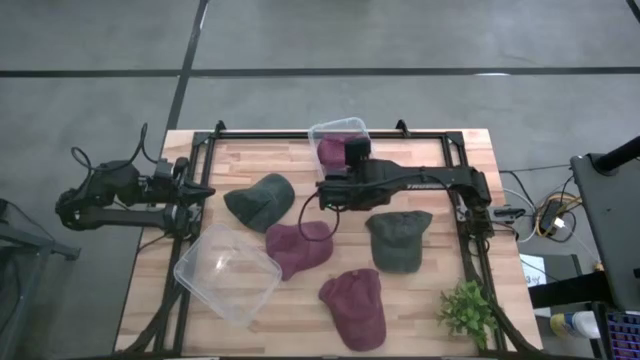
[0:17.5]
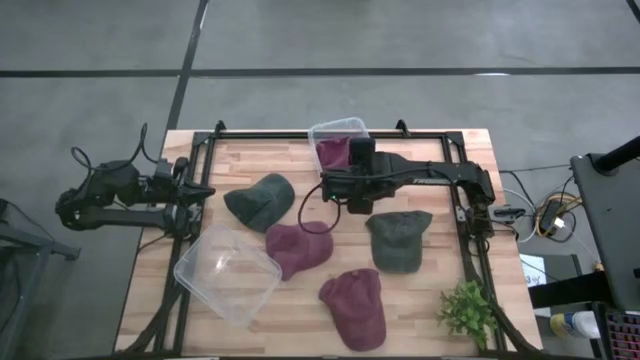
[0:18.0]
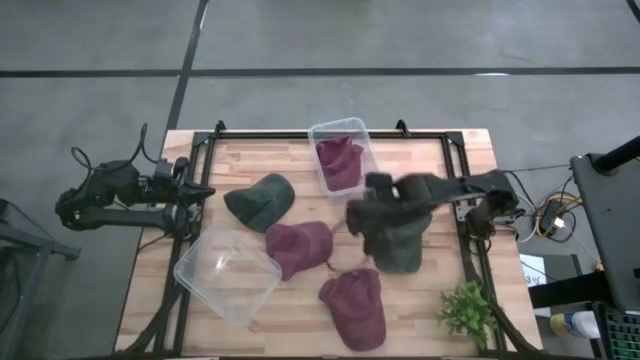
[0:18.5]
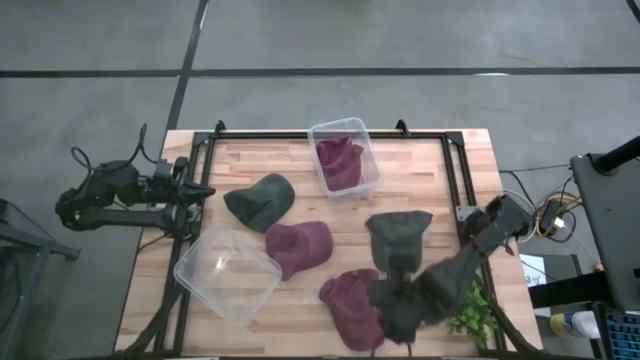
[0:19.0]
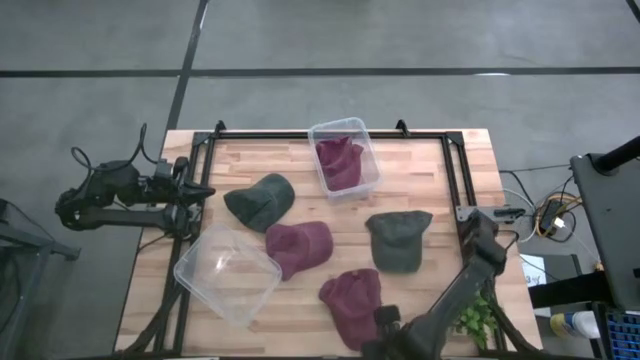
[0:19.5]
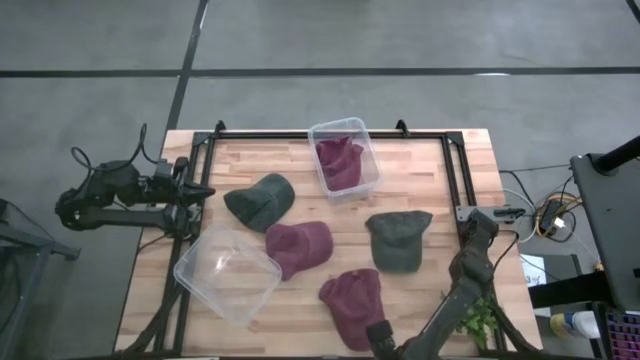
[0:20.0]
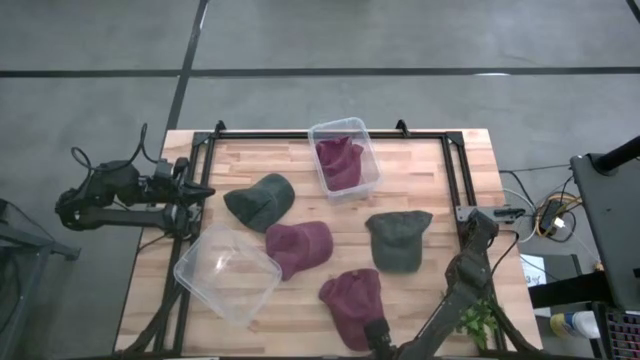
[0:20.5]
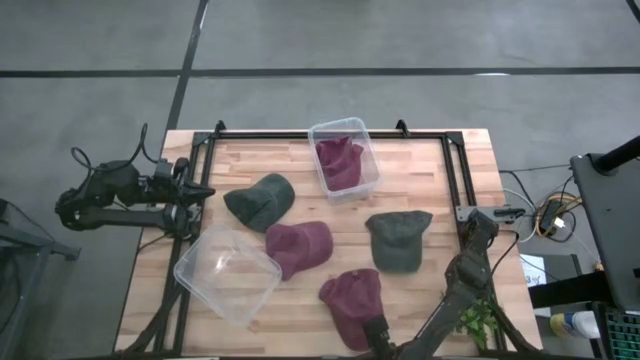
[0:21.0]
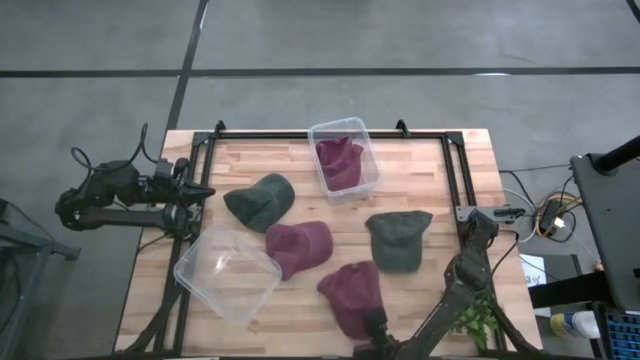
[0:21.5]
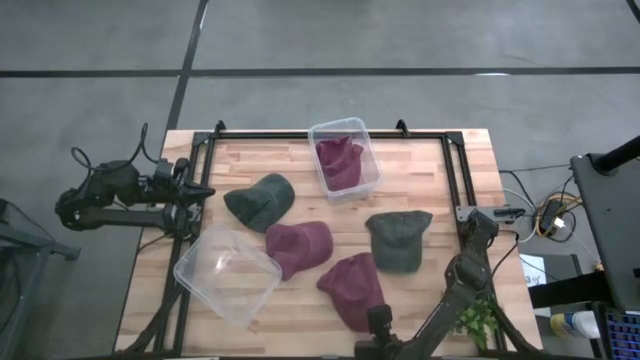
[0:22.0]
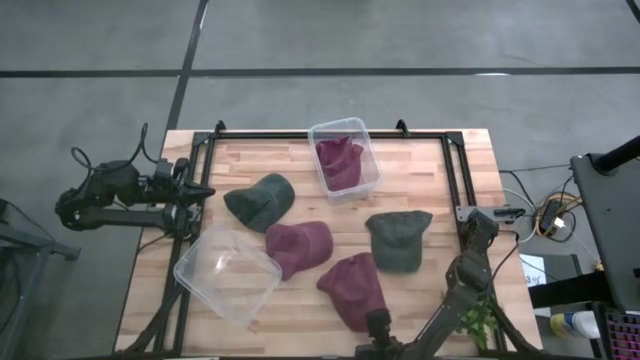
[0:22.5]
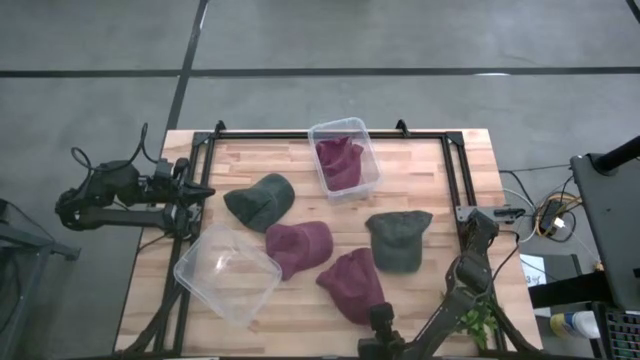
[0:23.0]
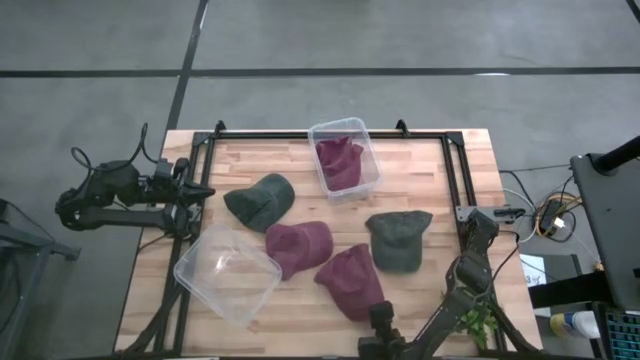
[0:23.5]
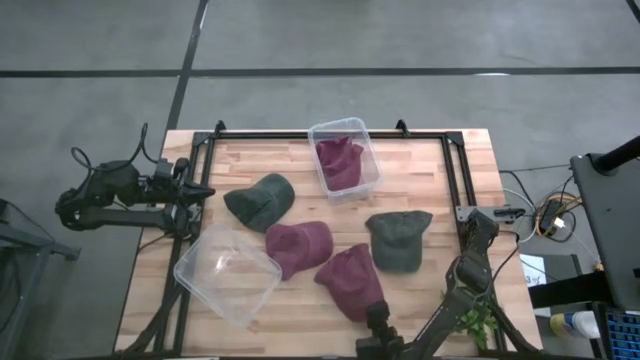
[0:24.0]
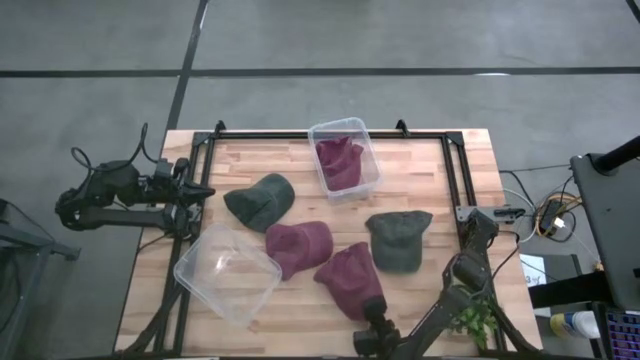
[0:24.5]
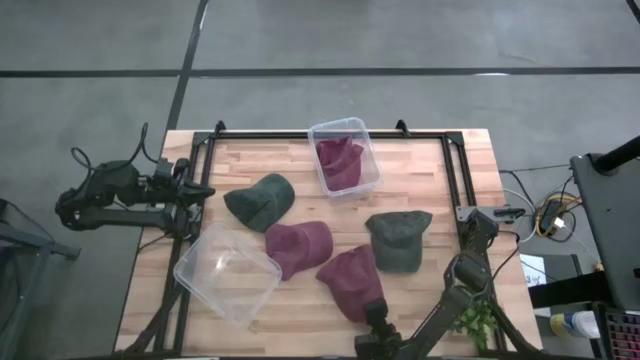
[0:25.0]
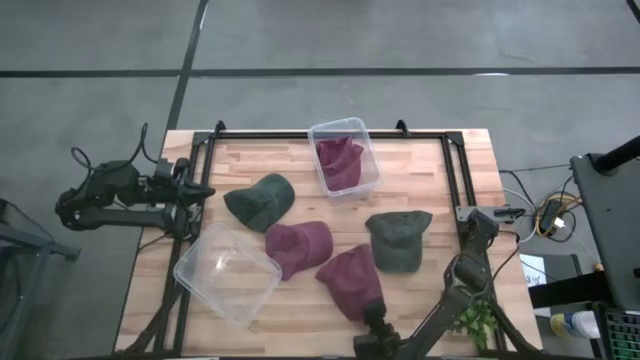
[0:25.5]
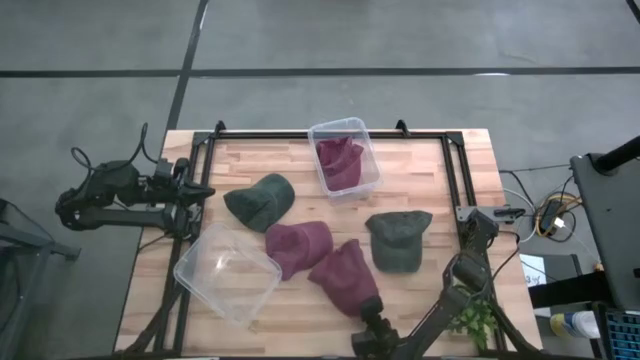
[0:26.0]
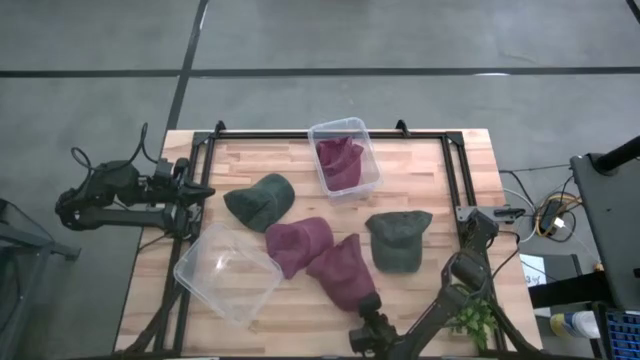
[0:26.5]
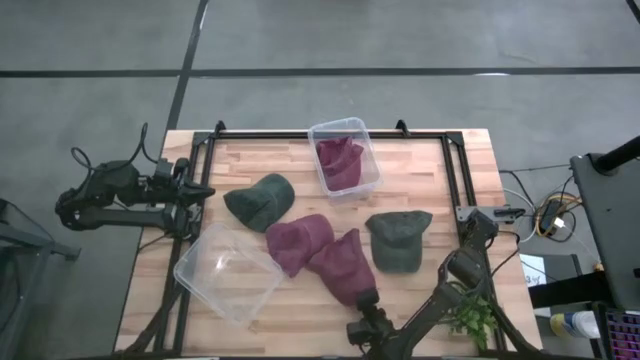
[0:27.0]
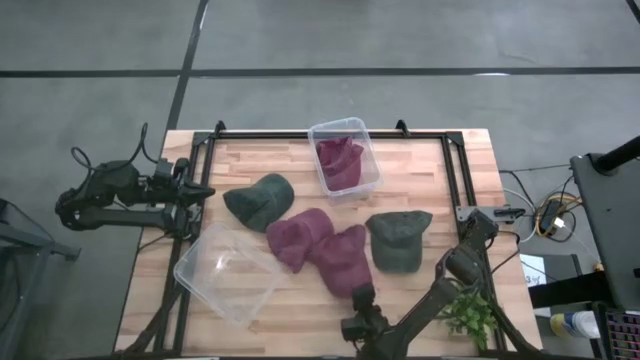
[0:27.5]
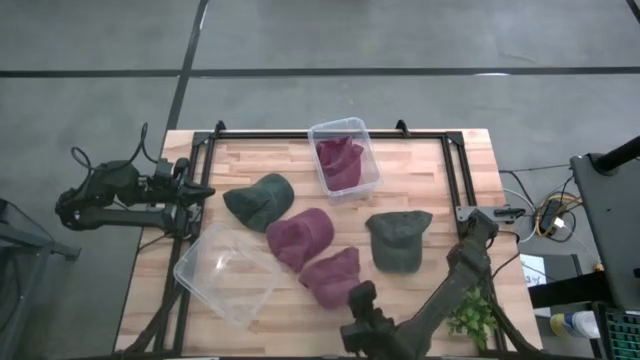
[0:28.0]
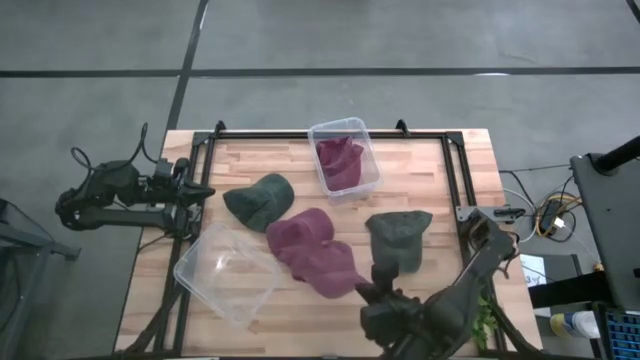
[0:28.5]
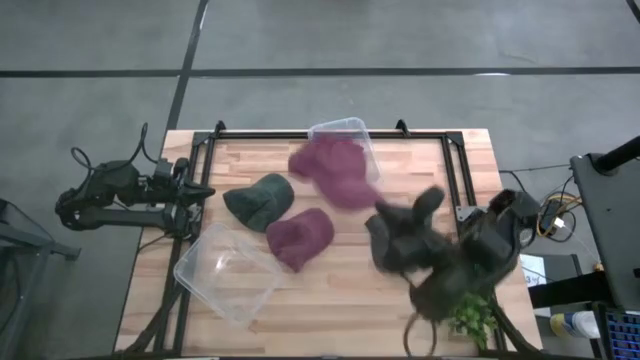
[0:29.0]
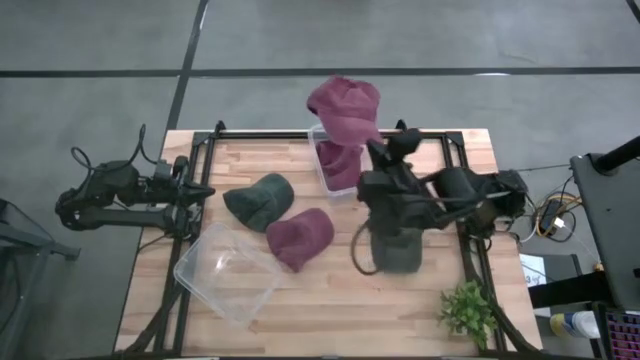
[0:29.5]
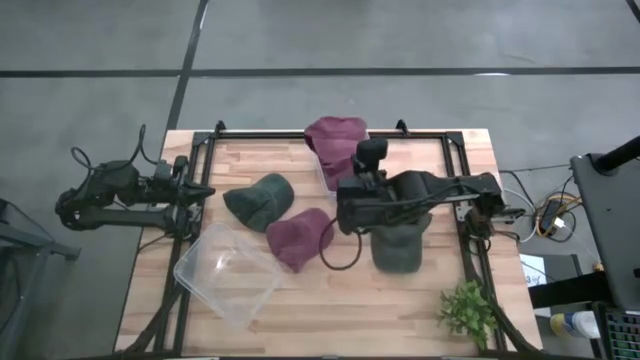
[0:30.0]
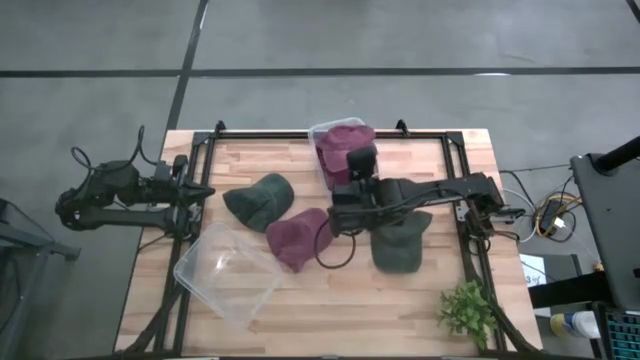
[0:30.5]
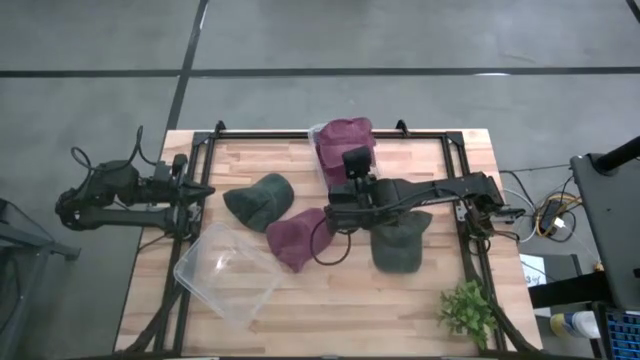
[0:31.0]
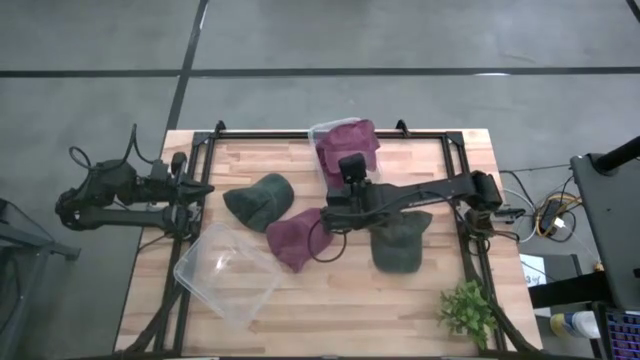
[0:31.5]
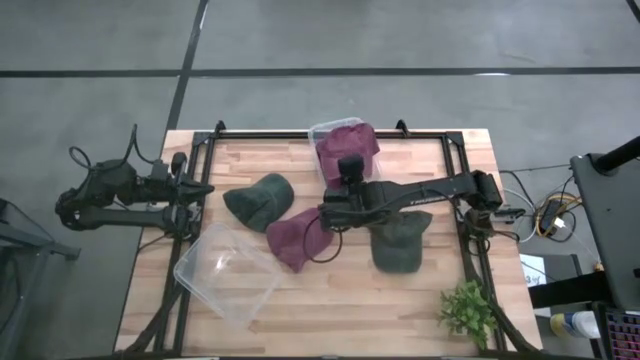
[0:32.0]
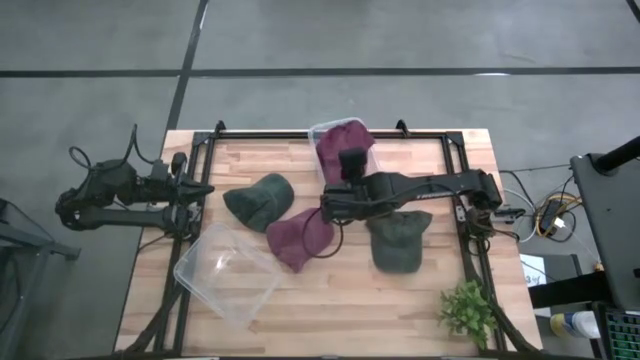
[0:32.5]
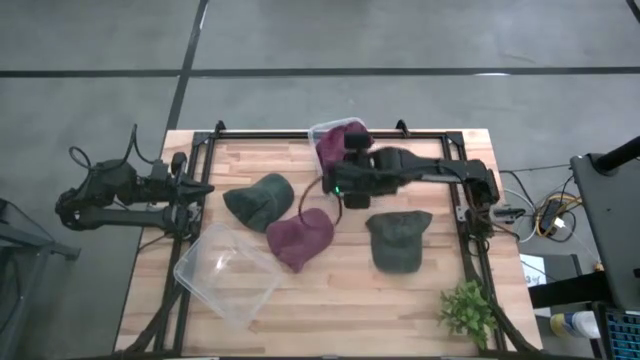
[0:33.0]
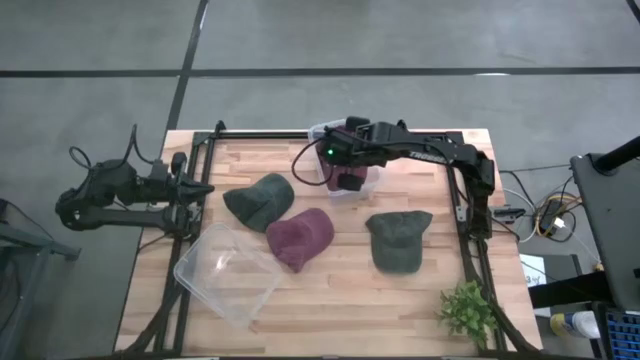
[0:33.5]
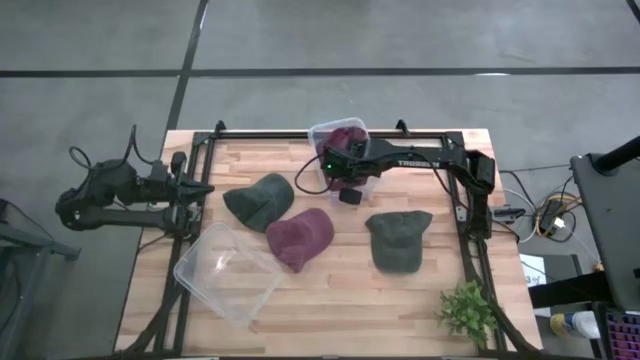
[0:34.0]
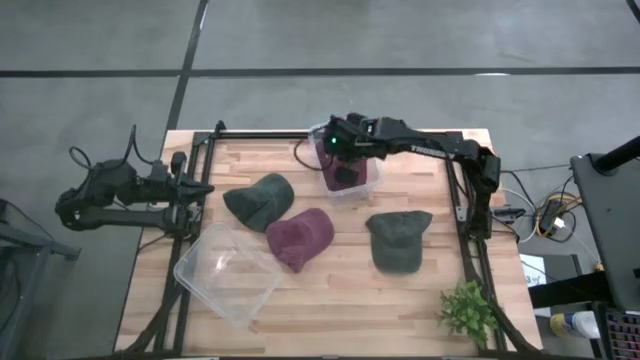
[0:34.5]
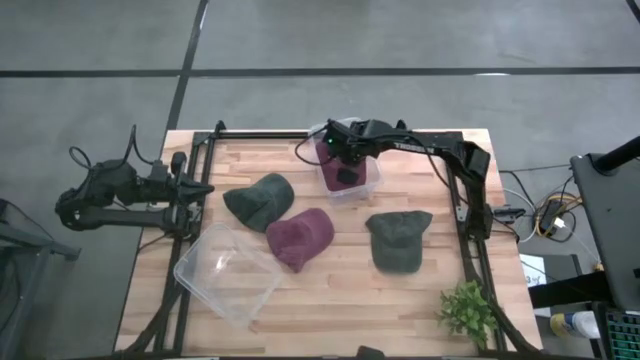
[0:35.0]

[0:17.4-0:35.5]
Task: Pick & Place hat
Put the dark red cap into the top transparent bin
